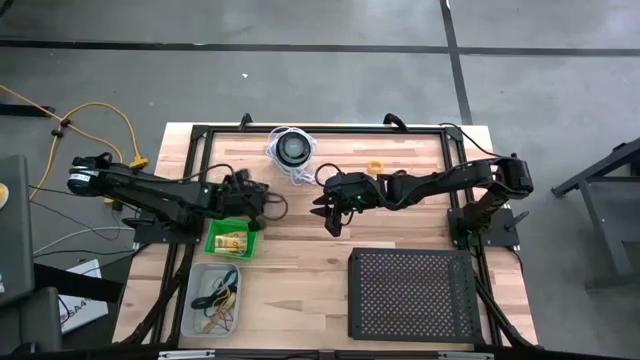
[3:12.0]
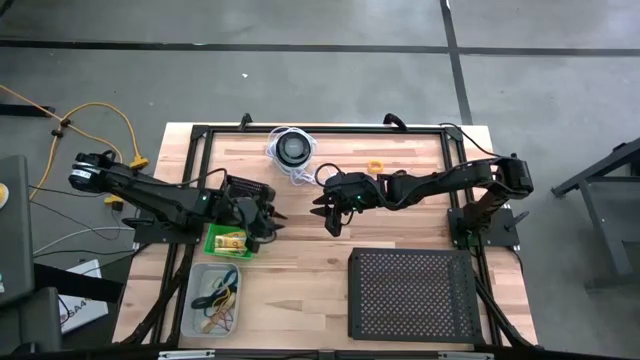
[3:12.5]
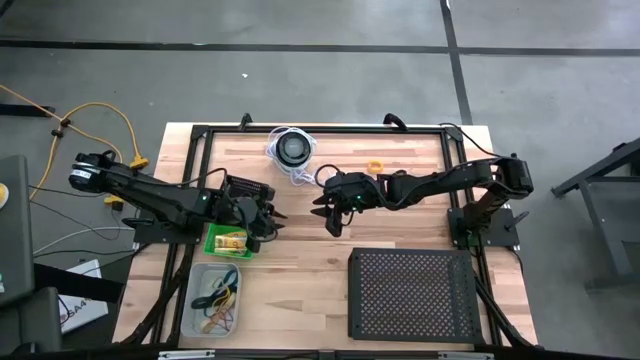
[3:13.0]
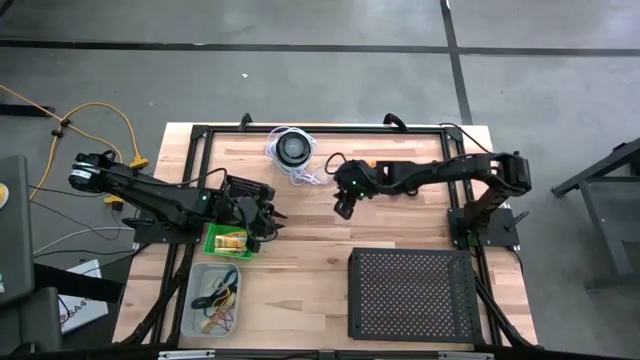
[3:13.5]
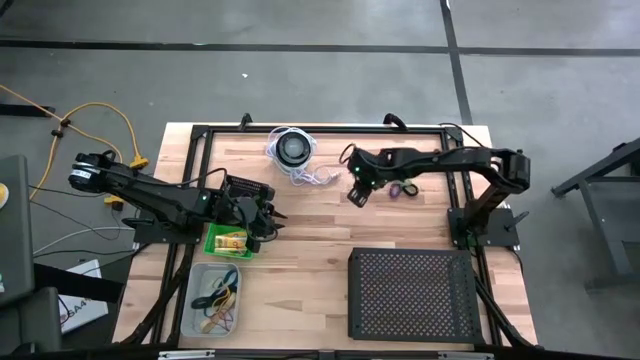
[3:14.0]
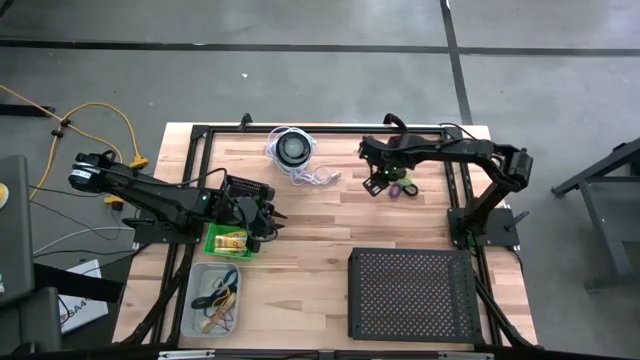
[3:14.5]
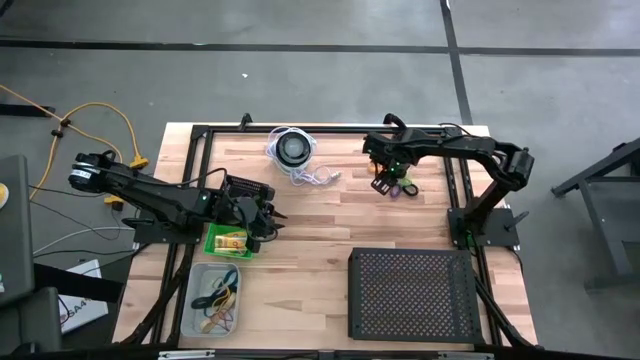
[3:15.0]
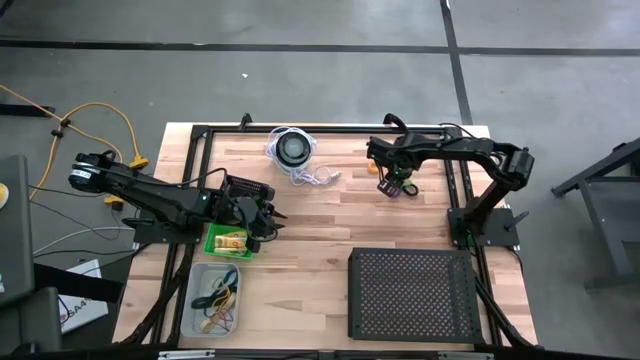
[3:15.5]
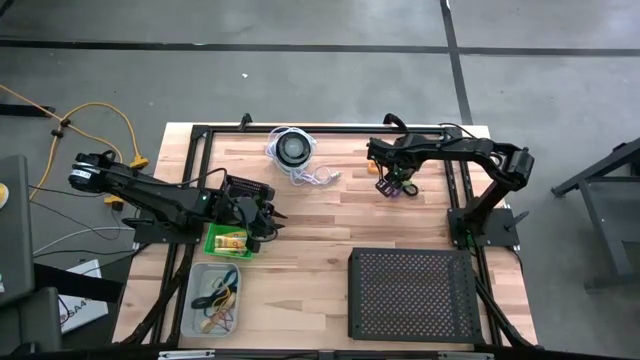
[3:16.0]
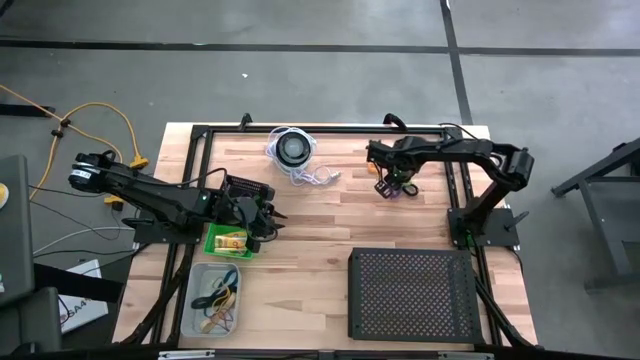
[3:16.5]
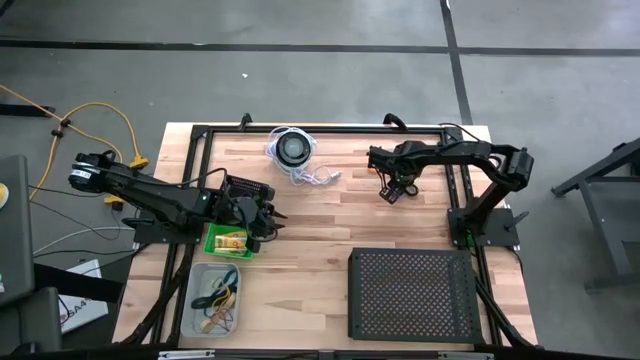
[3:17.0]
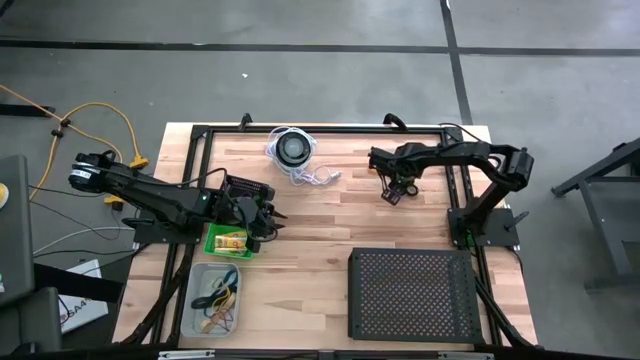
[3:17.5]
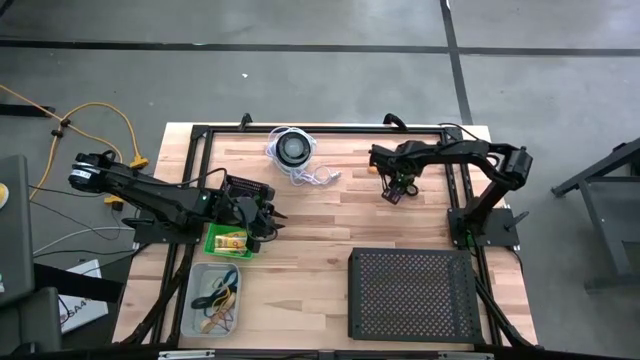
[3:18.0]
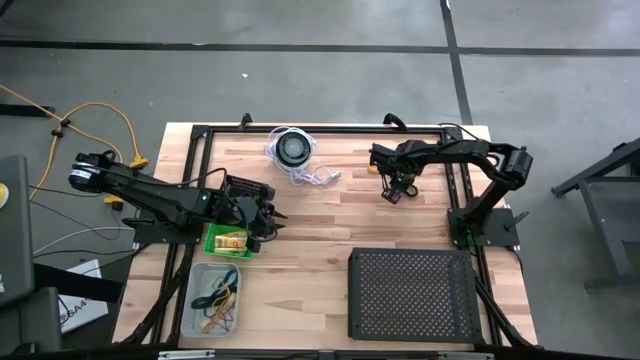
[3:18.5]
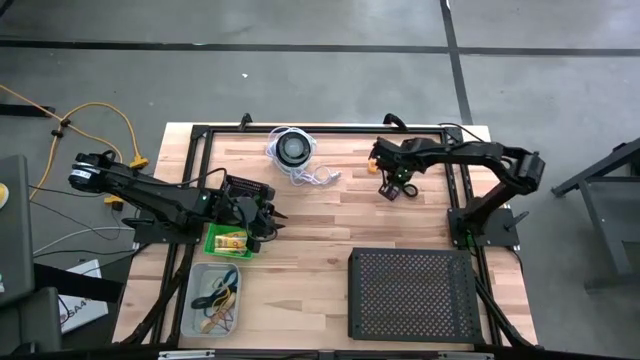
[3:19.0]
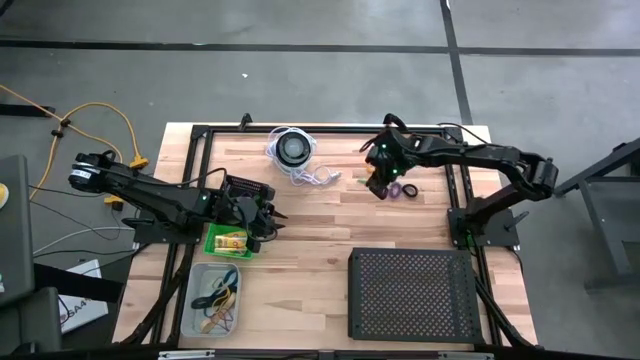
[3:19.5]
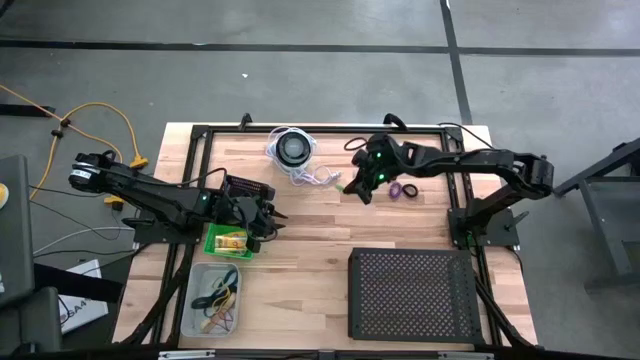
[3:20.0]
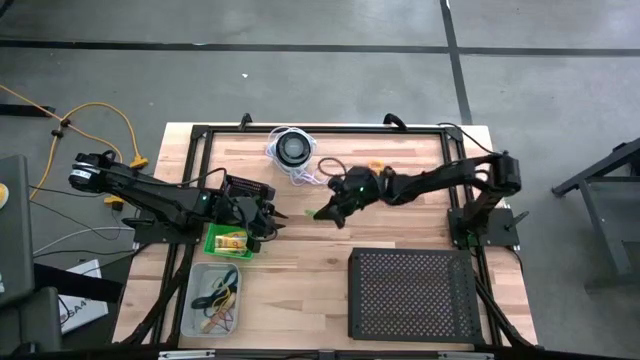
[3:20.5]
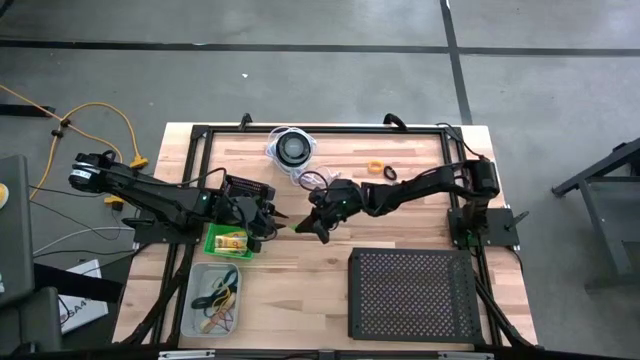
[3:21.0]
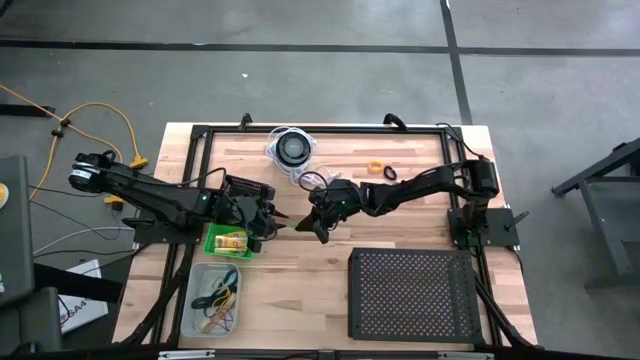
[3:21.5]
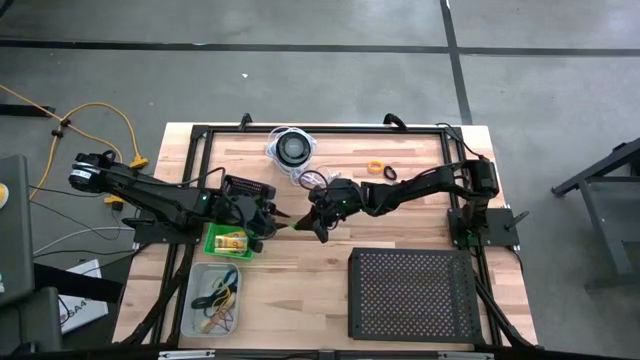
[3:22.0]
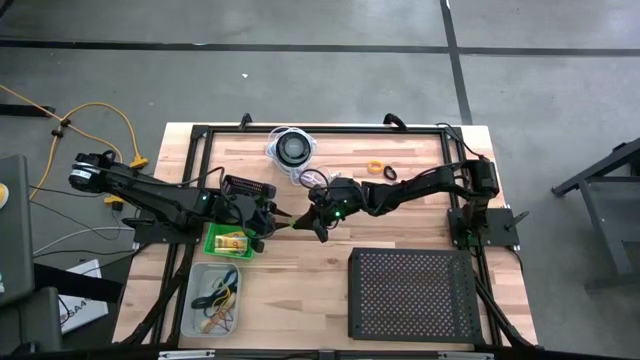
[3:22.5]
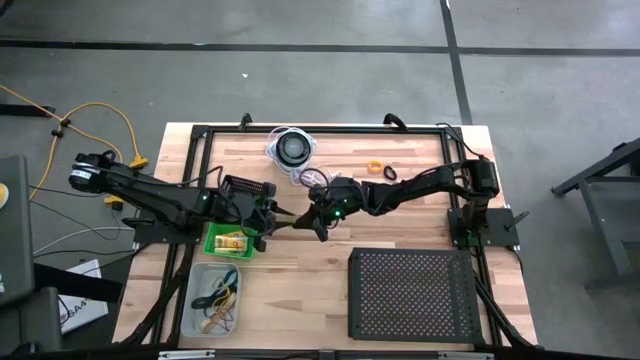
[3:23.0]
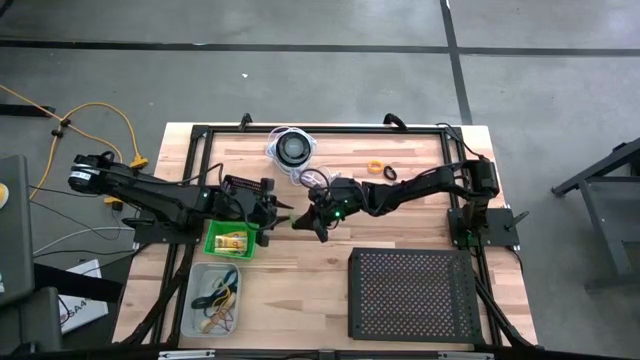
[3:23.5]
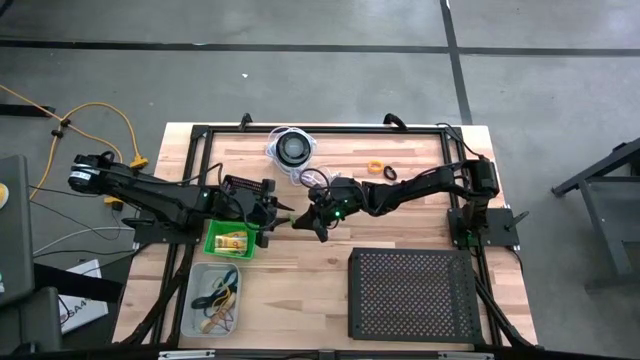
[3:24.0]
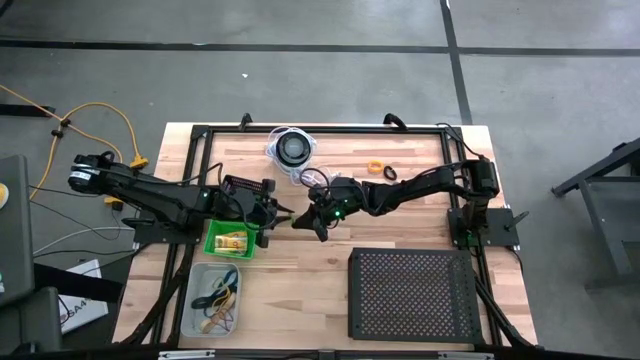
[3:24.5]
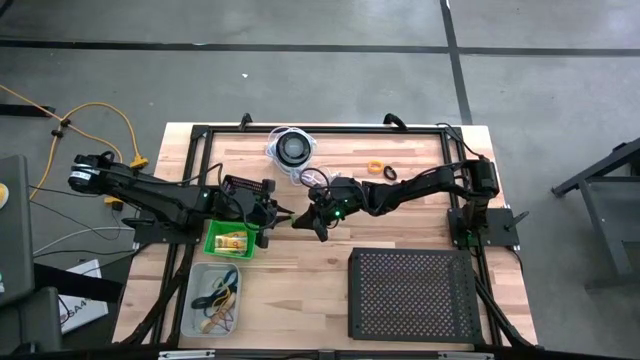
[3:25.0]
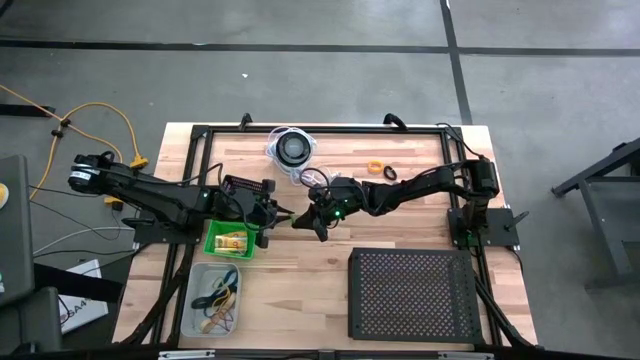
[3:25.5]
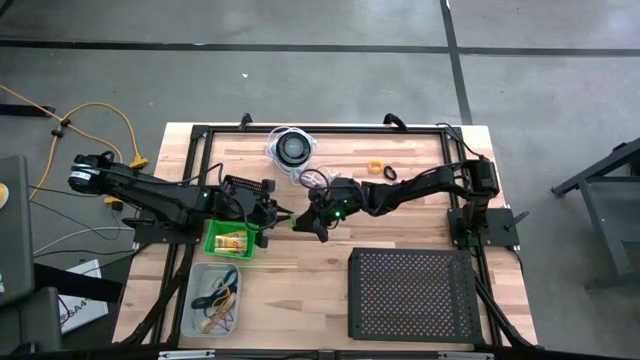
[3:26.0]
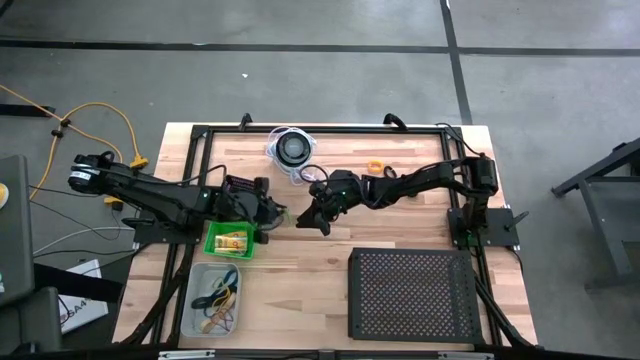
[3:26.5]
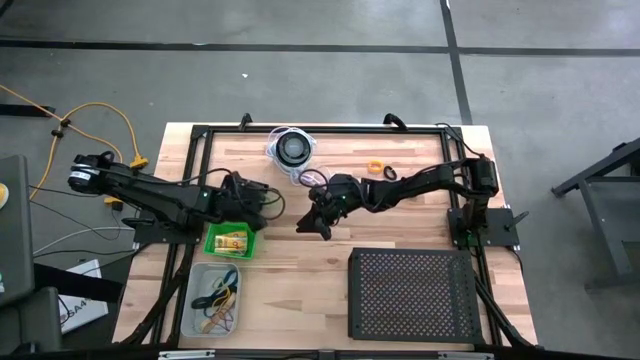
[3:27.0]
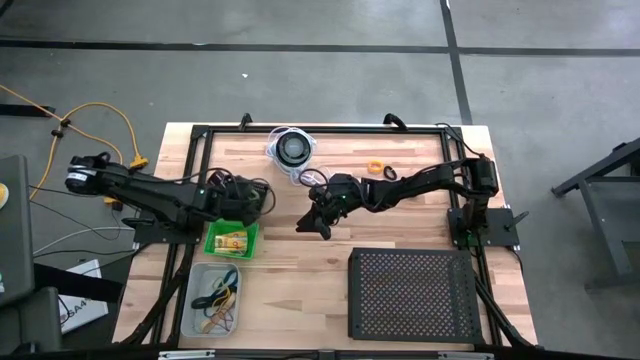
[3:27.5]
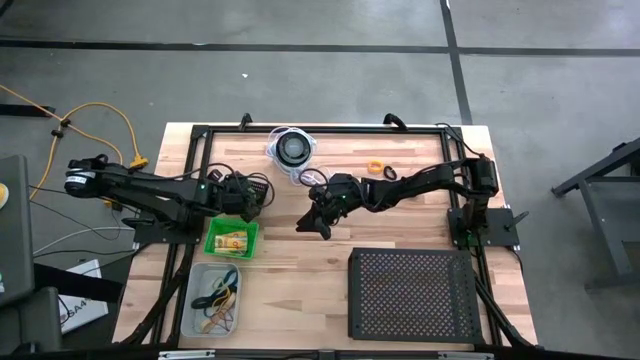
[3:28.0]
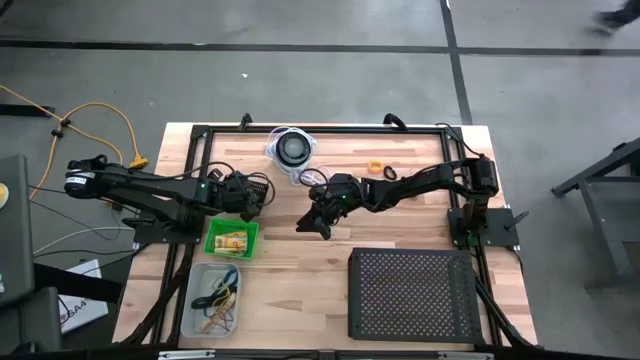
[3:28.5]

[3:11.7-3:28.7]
Task: Pick & Place Office Desk Supplies
Put the green coil keychain into the black bin

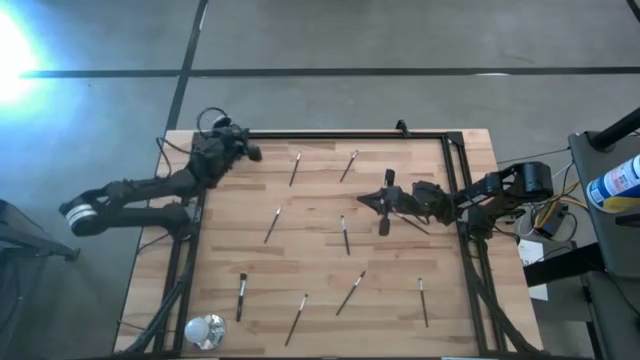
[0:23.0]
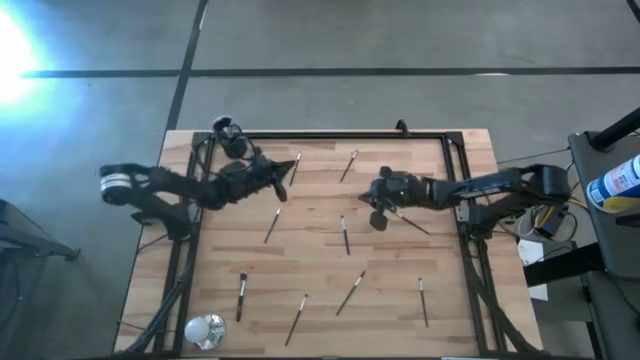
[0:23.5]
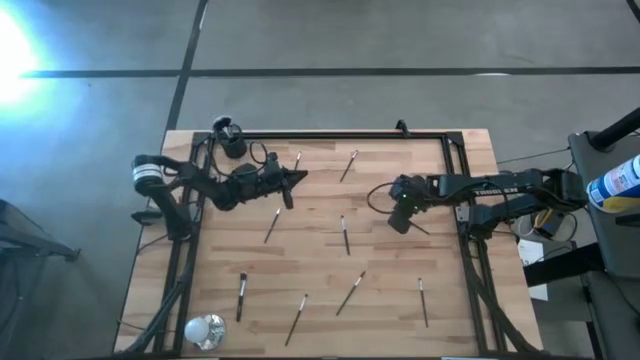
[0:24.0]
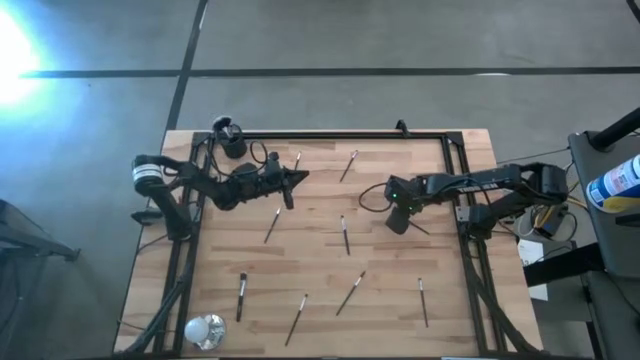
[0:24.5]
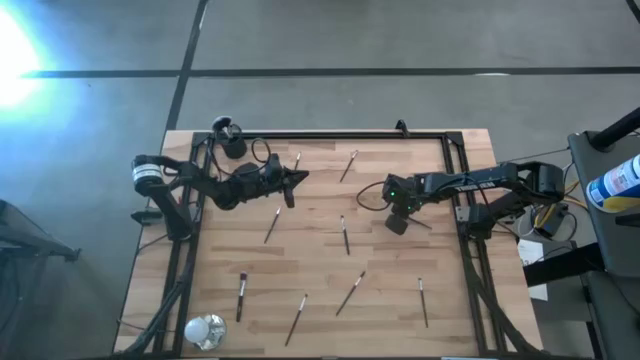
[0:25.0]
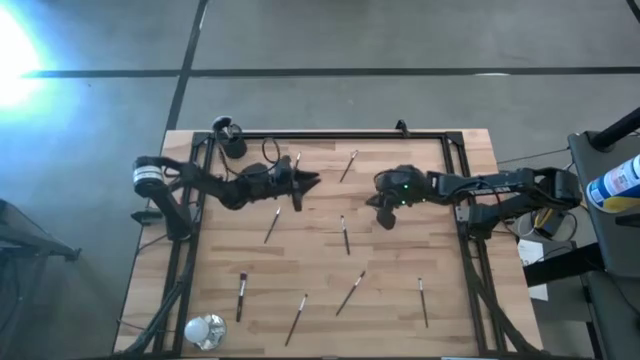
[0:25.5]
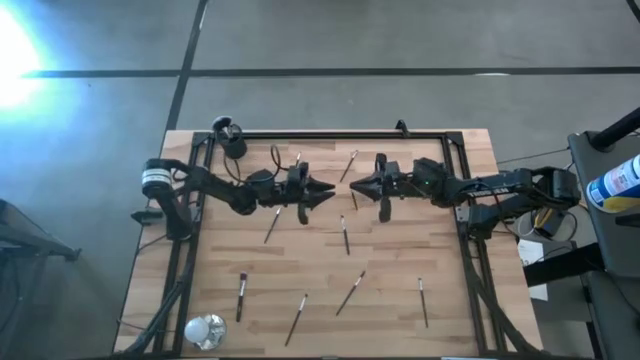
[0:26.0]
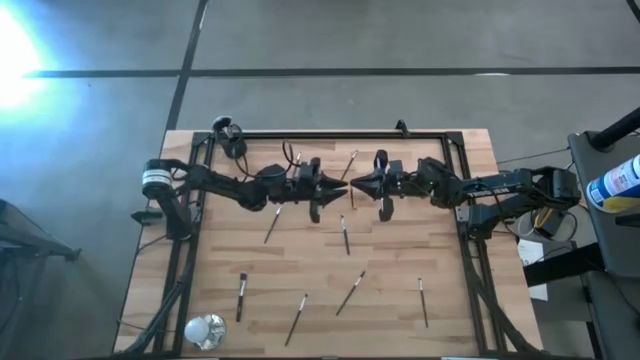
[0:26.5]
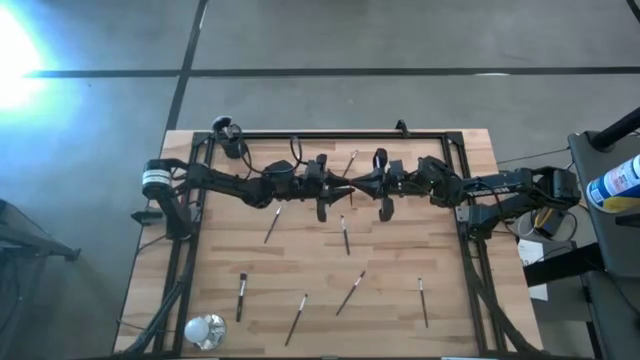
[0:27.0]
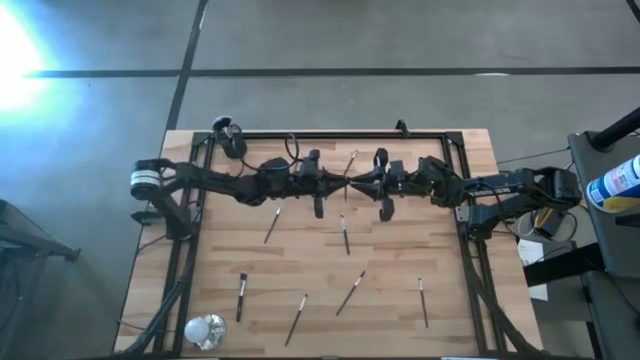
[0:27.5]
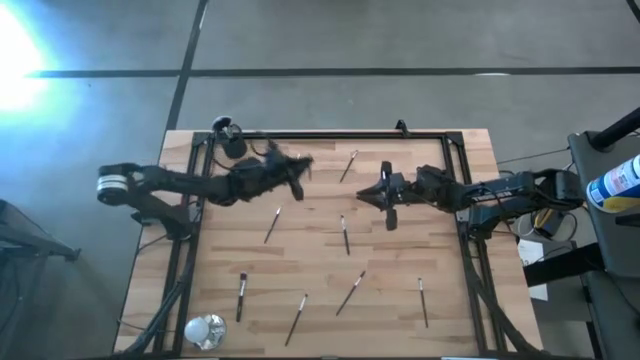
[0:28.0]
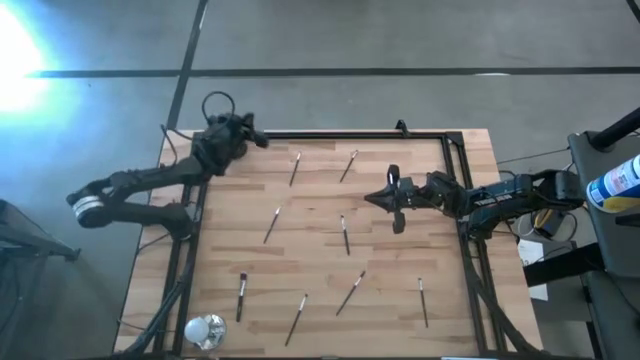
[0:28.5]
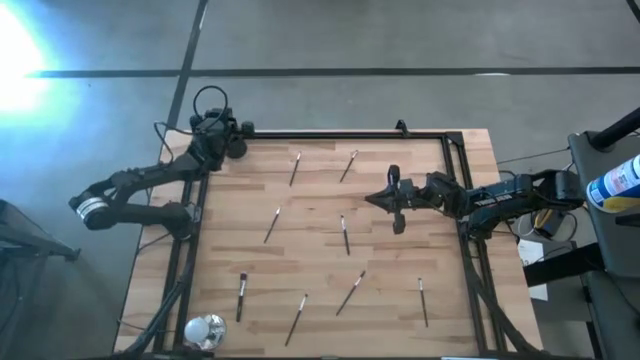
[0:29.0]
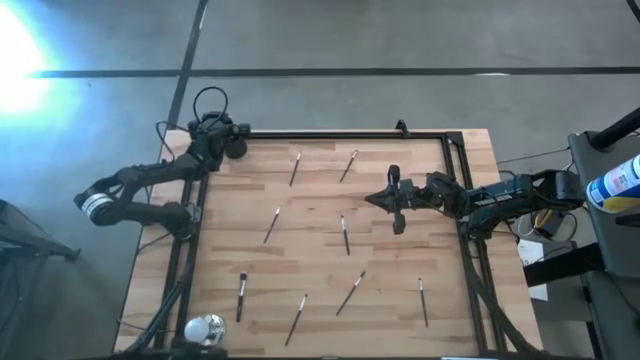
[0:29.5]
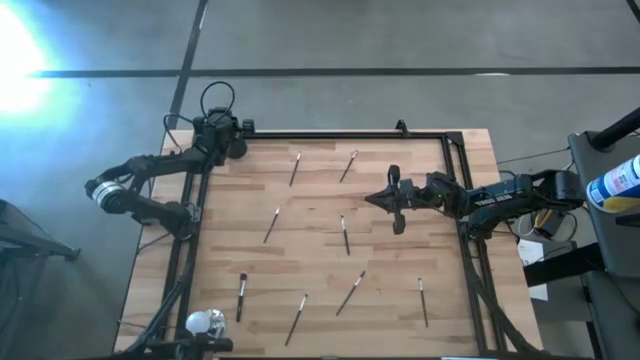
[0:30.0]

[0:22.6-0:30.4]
Task: Put items in baskets/containers
Put the black eyeshadow brush into the black pen holder
